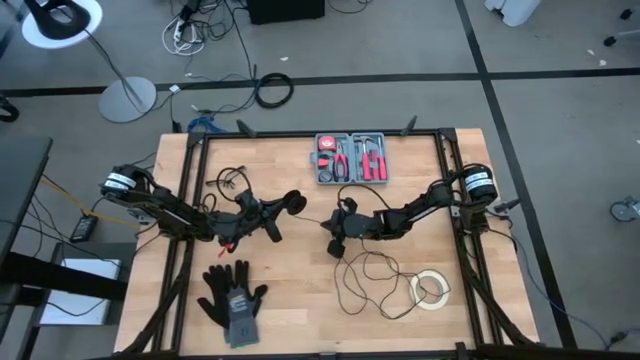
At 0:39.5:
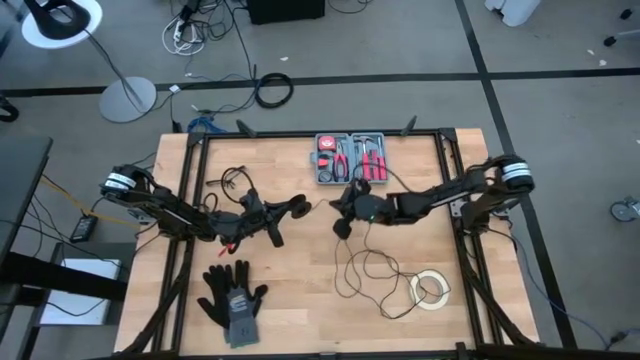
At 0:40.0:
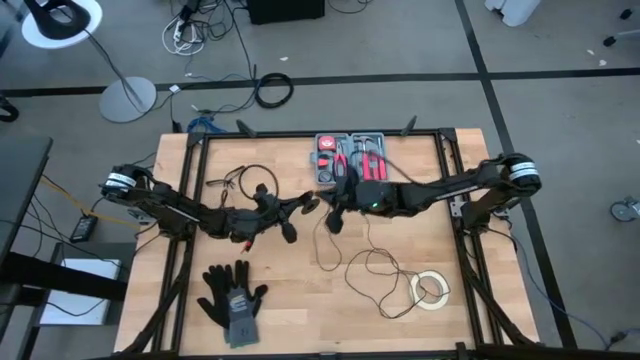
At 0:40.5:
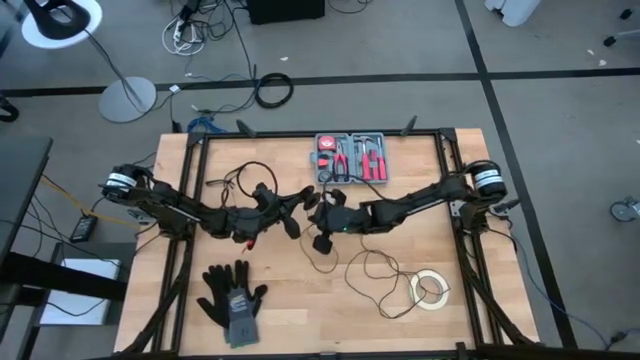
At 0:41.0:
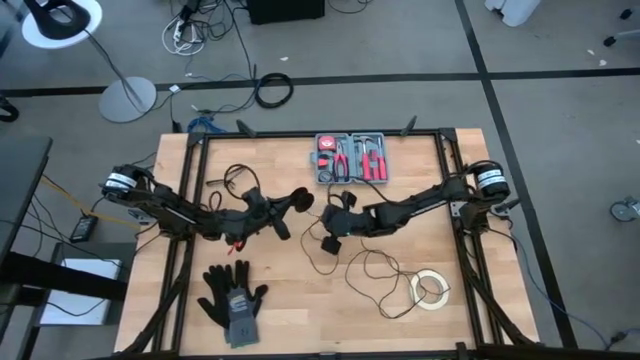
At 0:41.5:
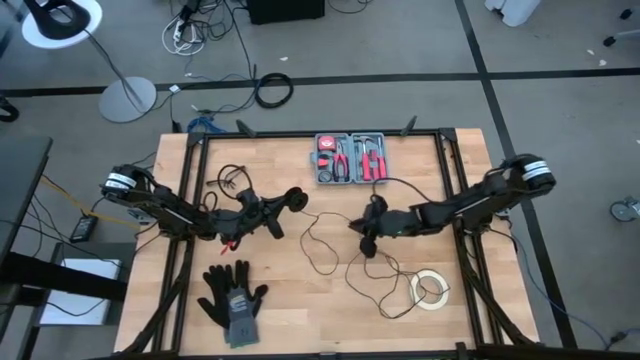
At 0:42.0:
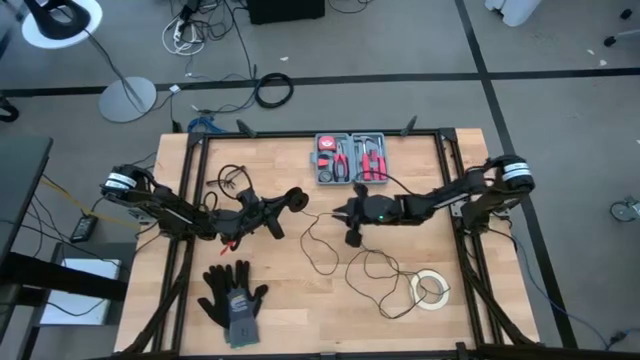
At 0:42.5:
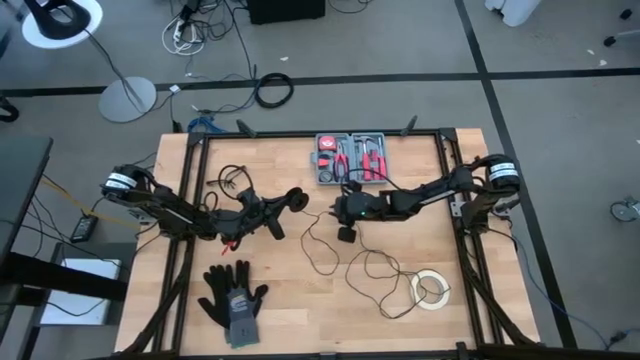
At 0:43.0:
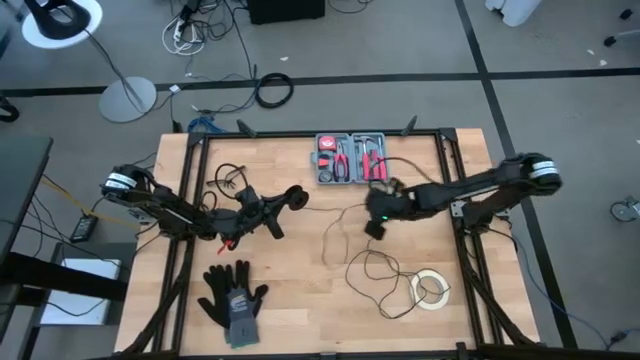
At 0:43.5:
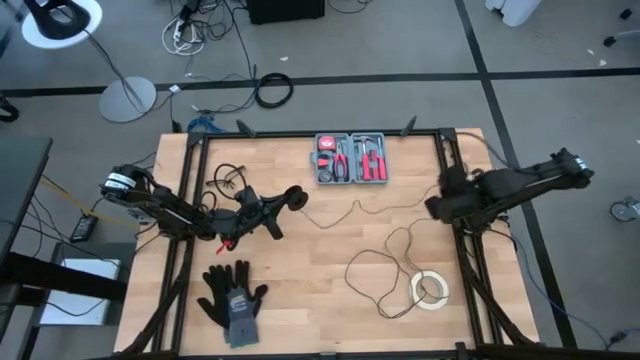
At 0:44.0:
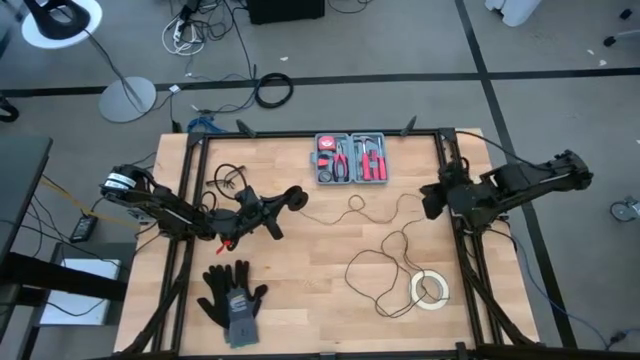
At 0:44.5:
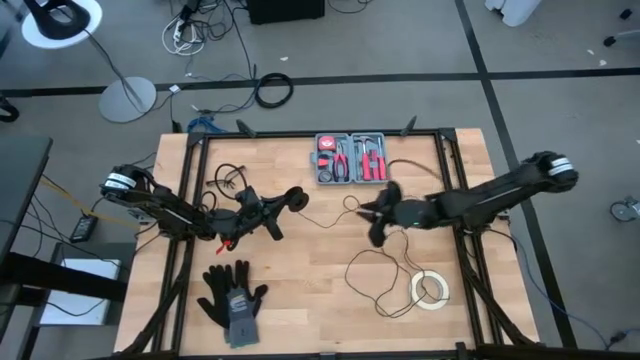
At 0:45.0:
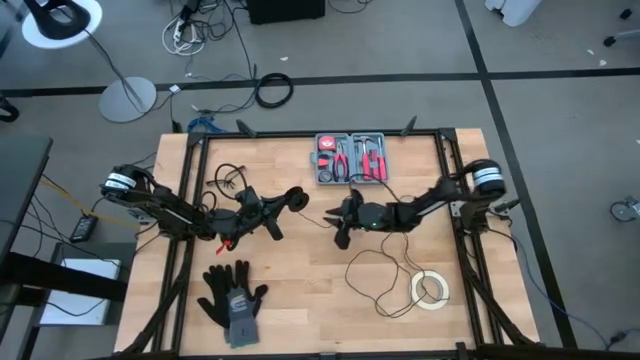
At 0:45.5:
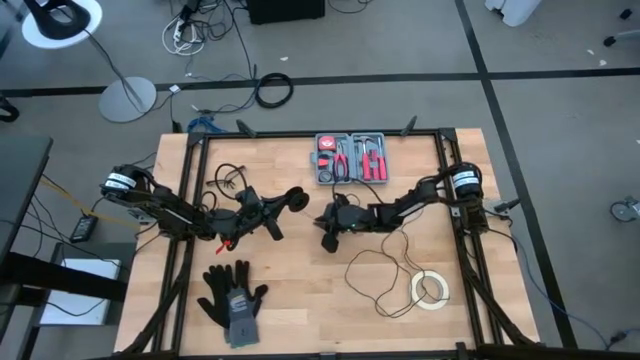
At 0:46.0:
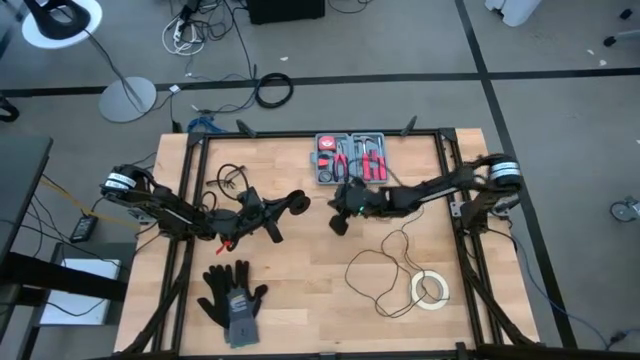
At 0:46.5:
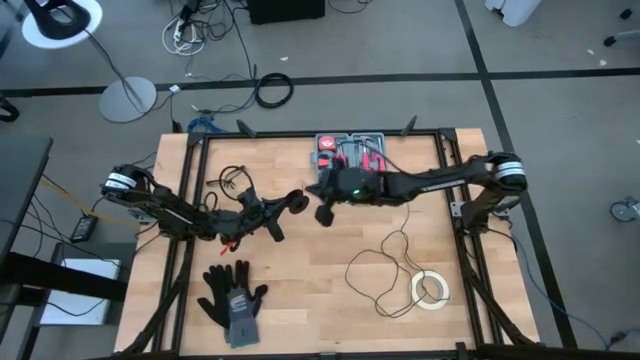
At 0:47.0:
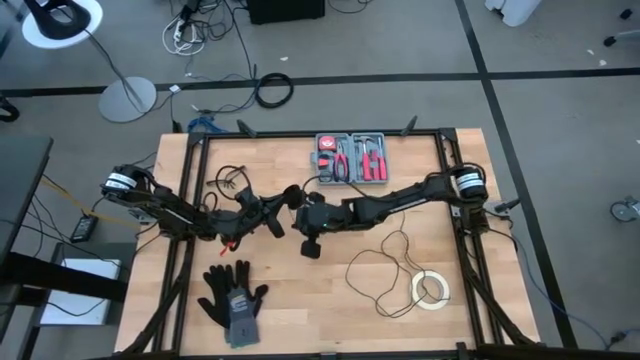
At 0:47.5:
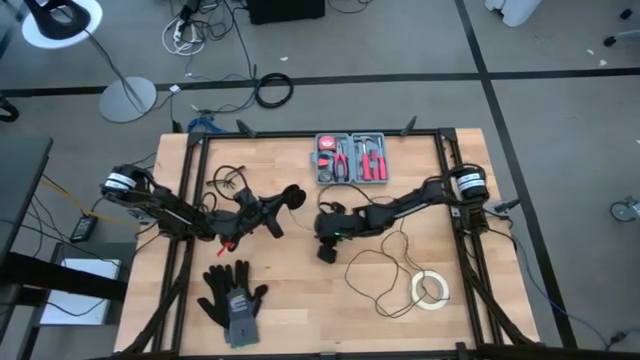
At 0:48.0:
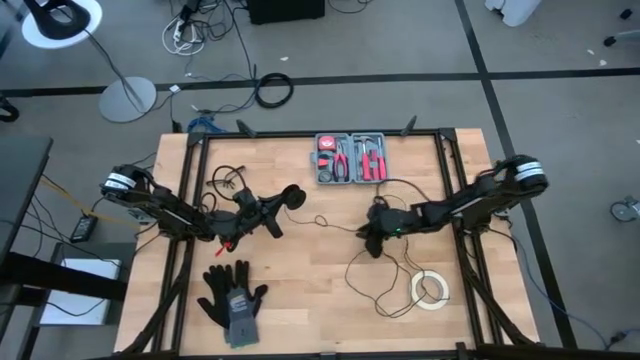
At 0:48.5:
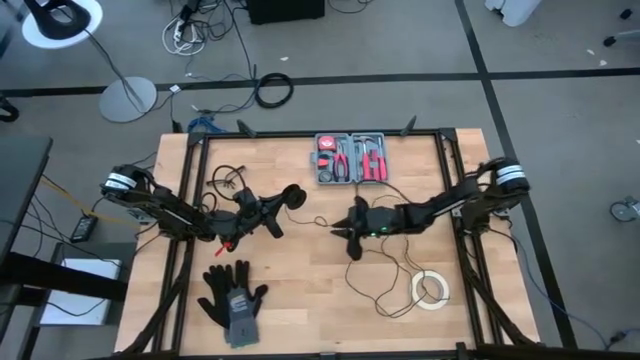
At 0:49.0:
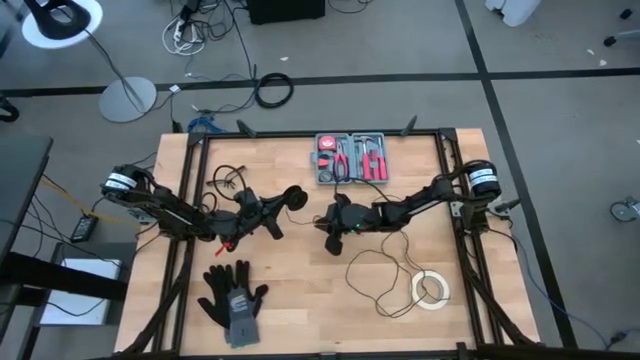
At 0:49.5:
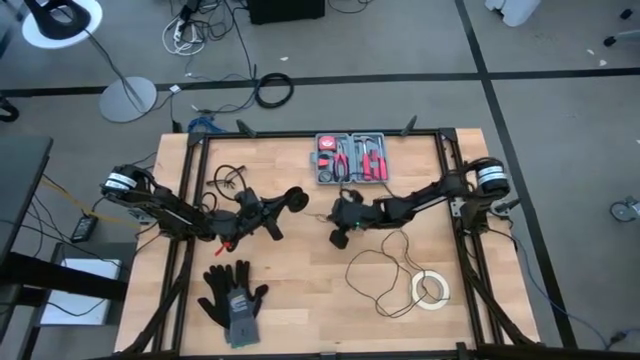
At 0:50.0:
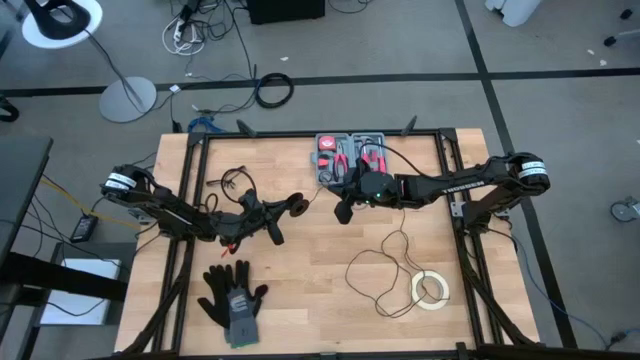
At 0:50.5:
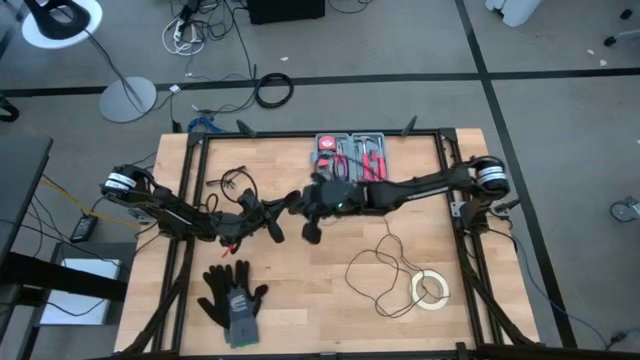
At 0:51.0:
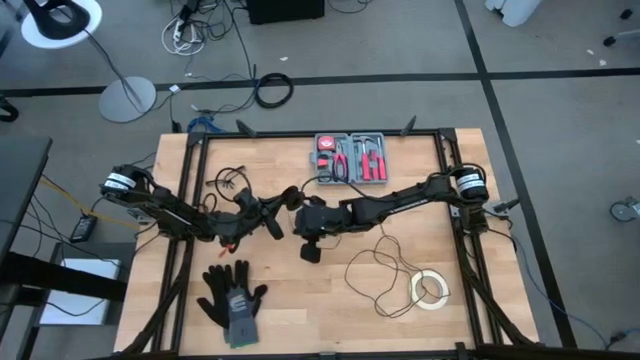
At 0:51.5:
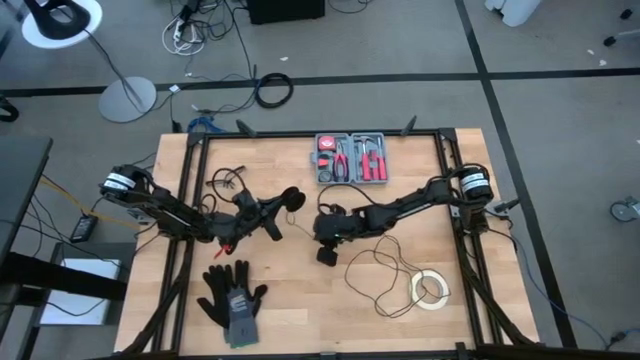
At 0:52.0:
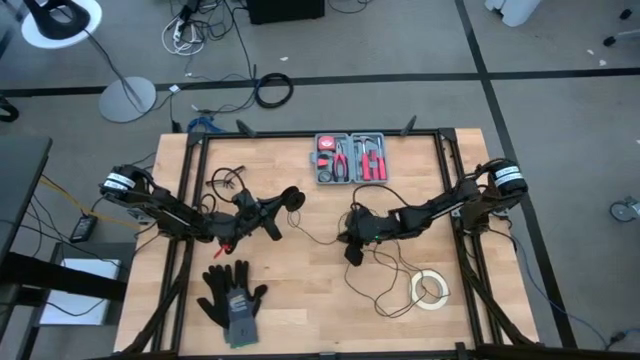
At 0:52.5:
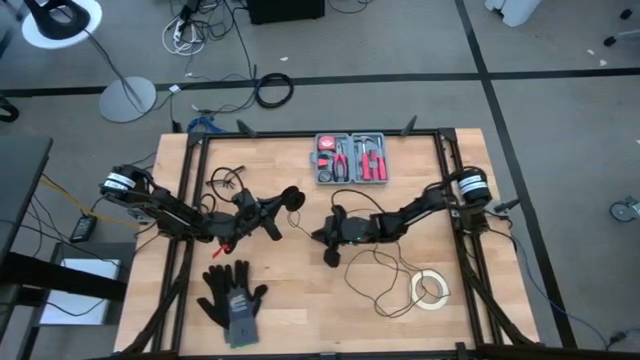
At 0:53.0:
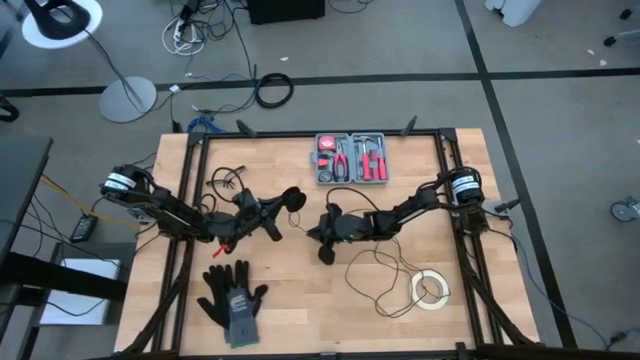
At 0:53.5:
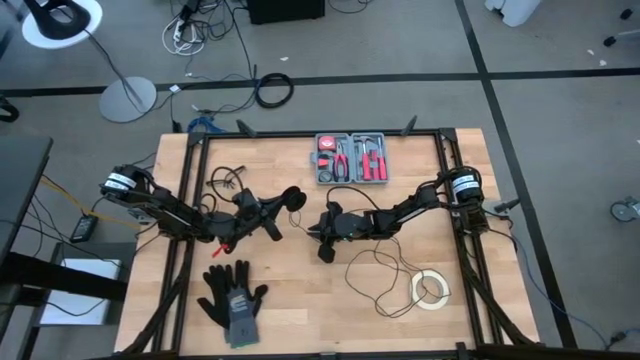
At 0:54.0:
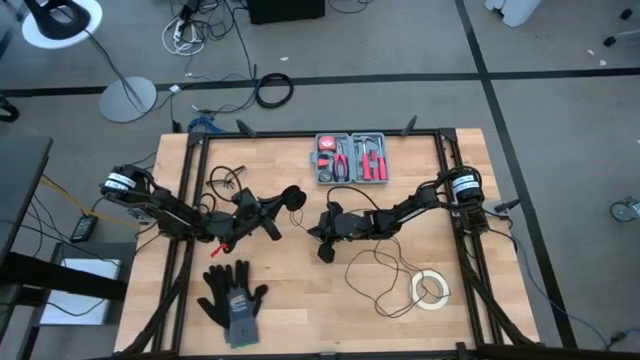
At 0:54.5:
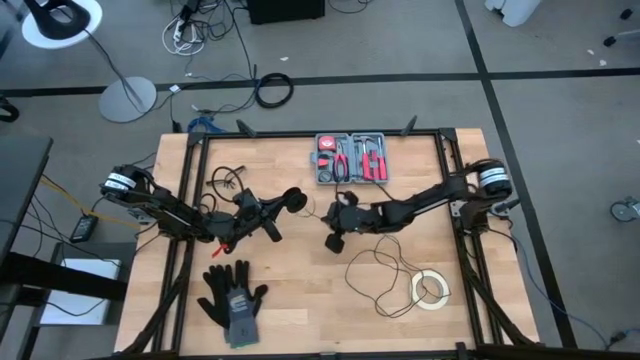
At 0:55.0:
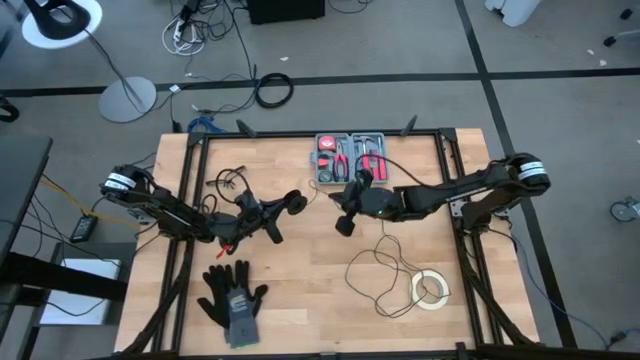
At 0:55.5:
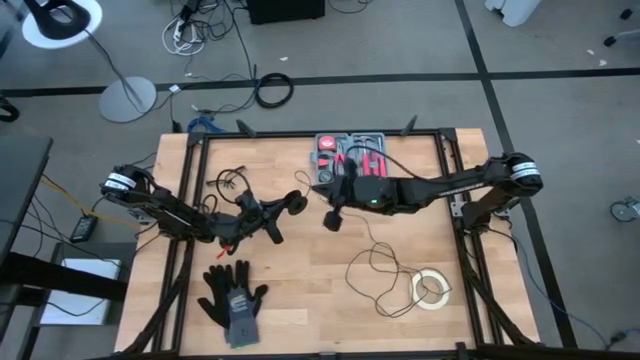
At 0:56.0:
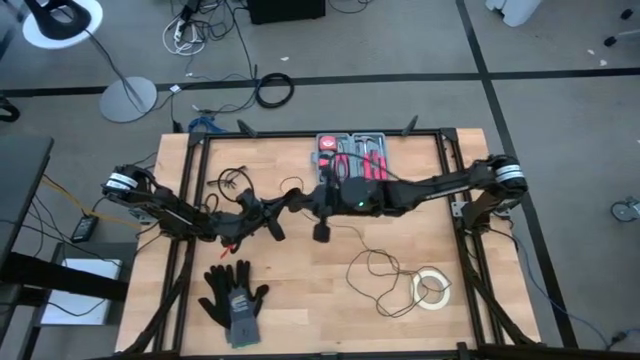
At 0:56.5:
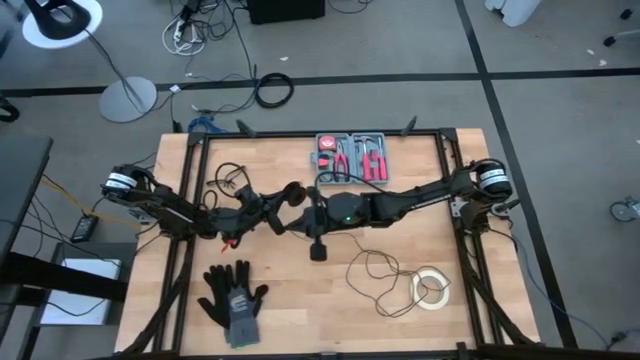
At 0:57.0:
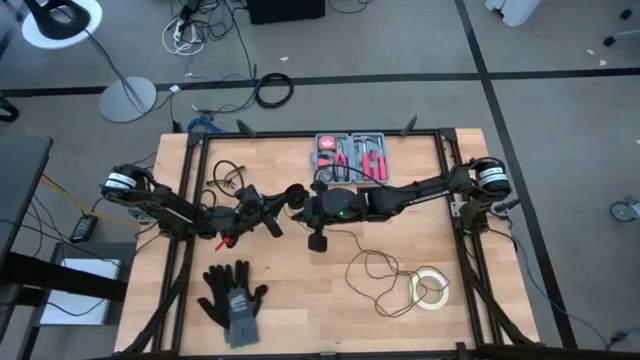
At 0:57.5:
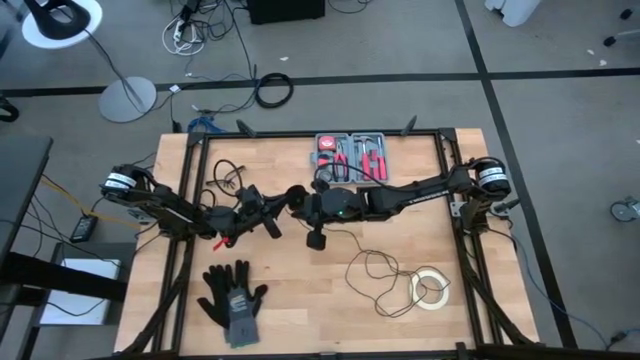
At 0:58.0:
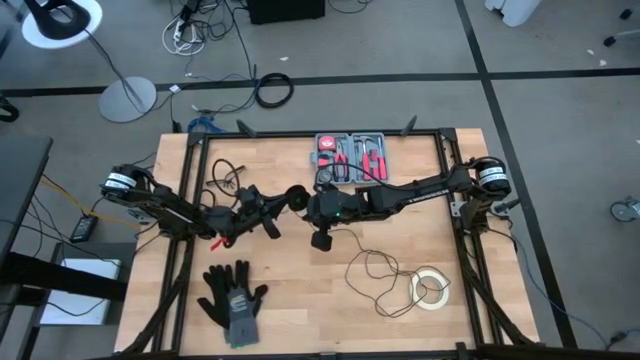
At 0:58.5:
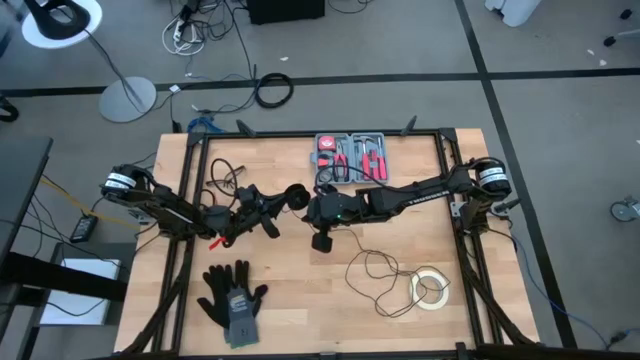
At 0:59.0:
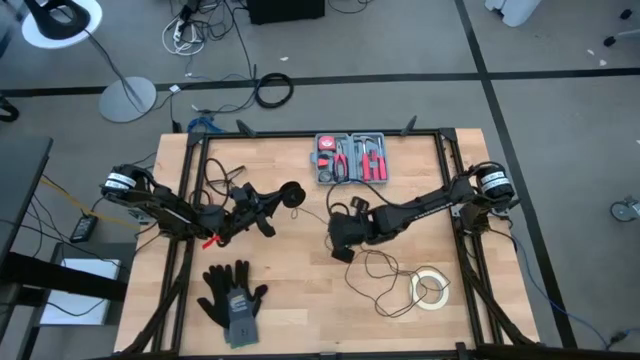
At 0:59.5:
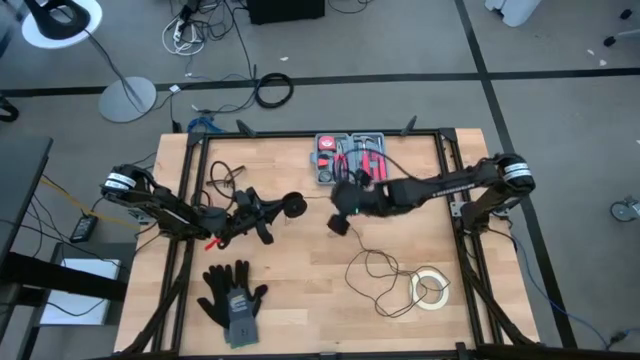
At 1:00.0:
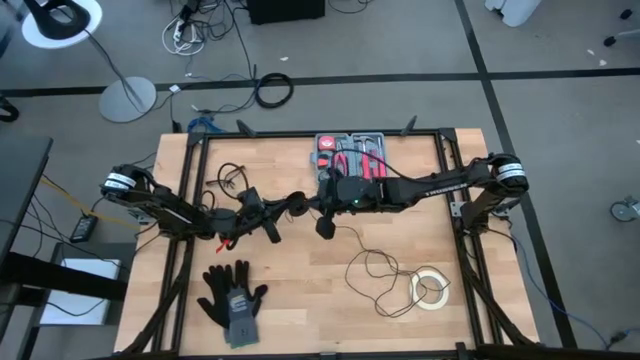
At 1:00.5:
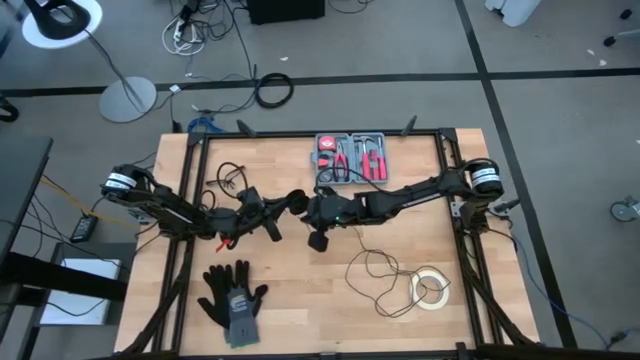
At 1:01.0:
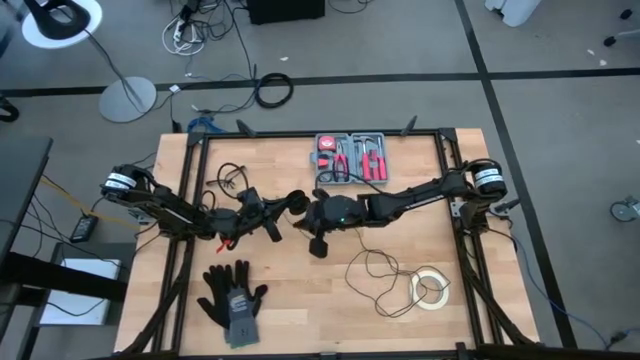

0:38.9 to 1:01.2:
Task: Coil cords
Coil the black wire onto the black spool
